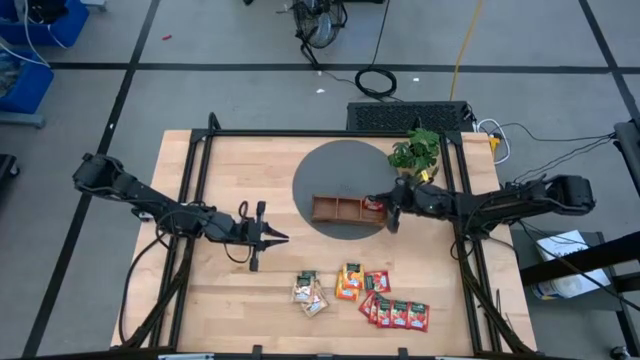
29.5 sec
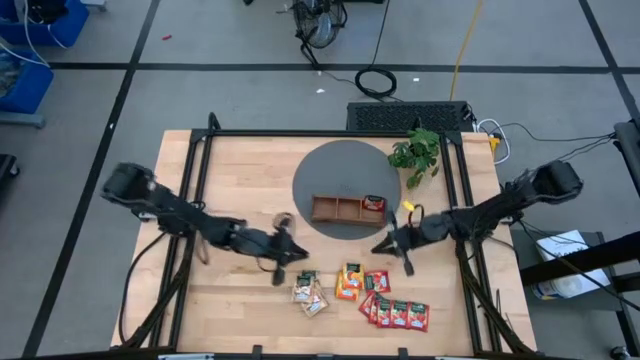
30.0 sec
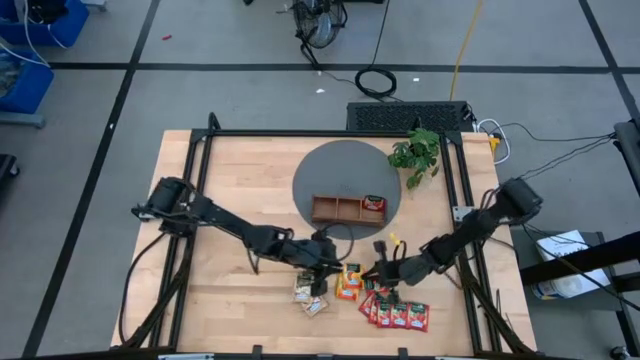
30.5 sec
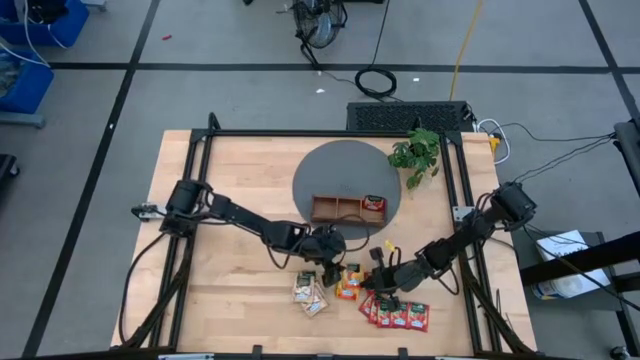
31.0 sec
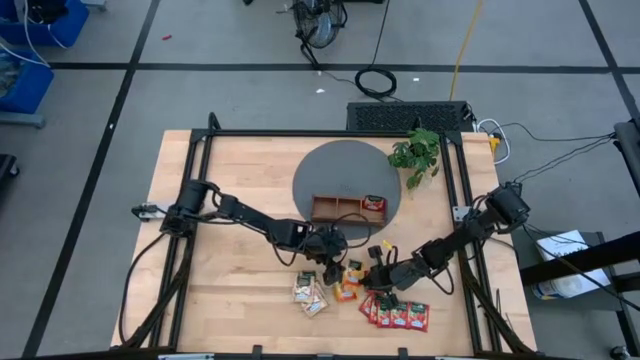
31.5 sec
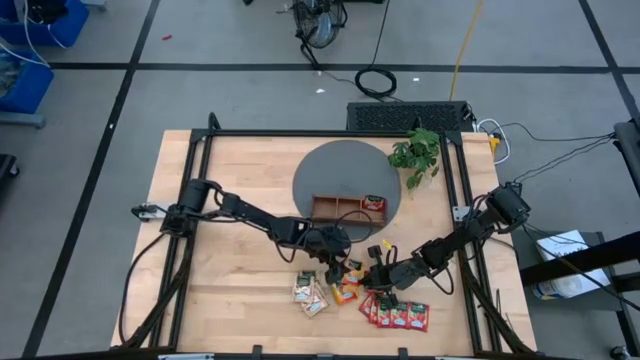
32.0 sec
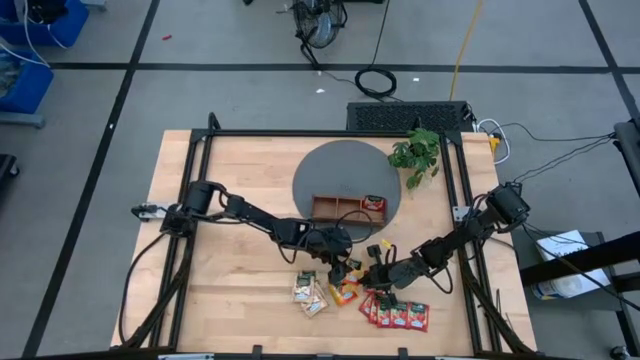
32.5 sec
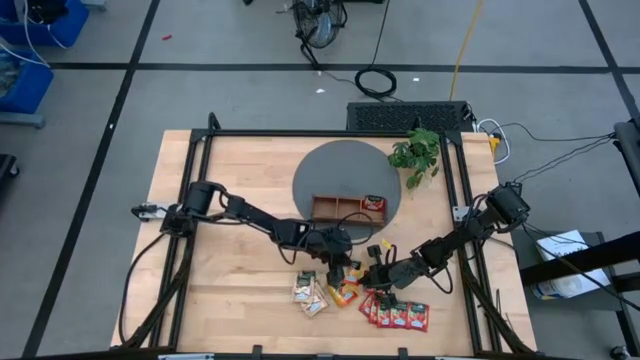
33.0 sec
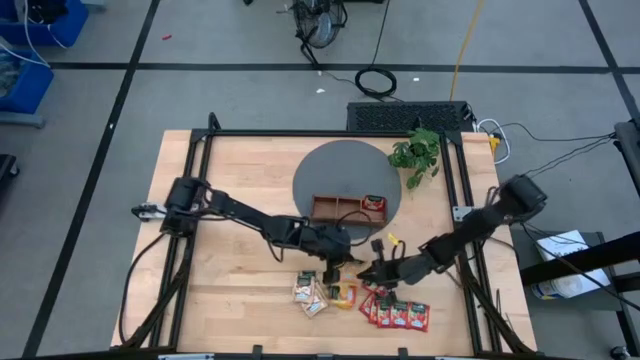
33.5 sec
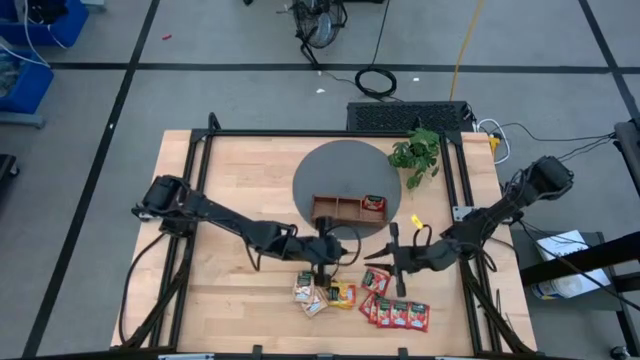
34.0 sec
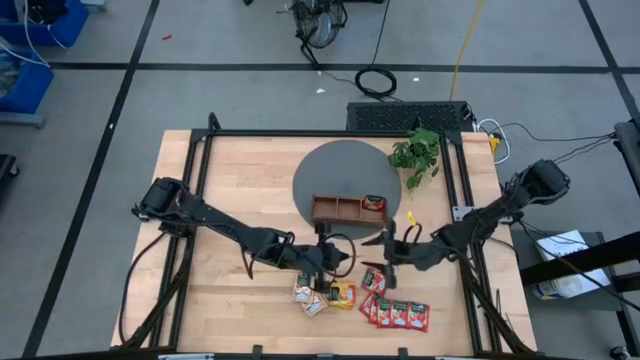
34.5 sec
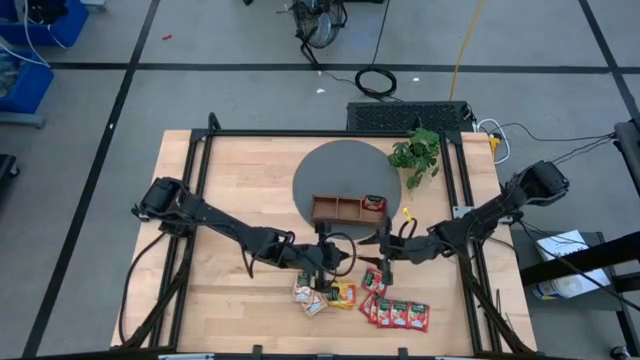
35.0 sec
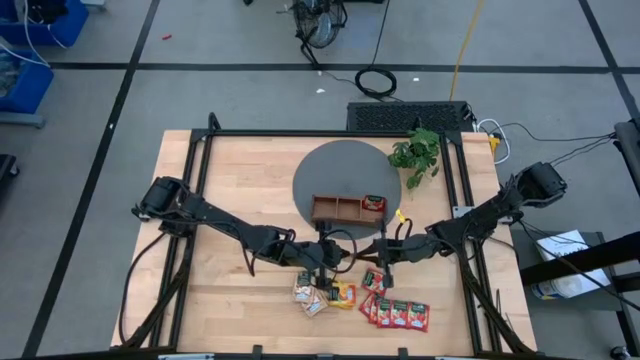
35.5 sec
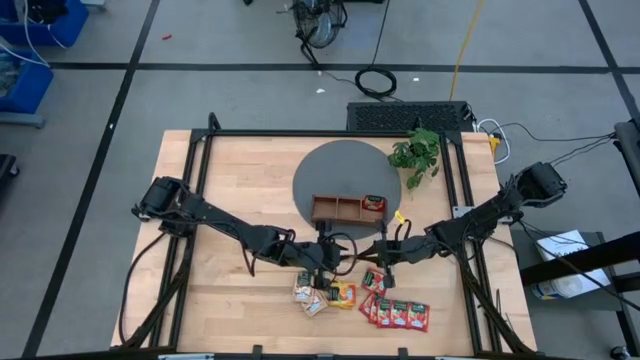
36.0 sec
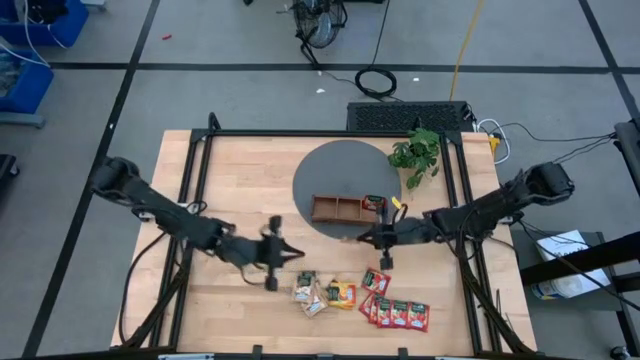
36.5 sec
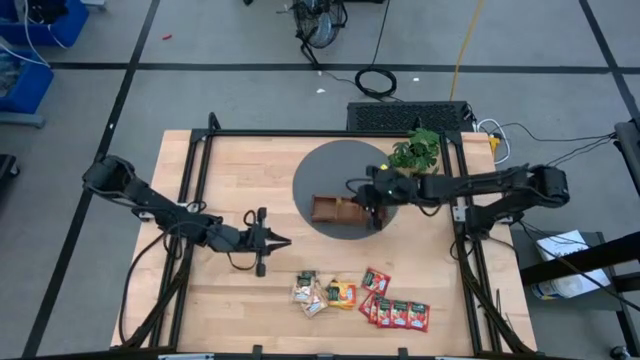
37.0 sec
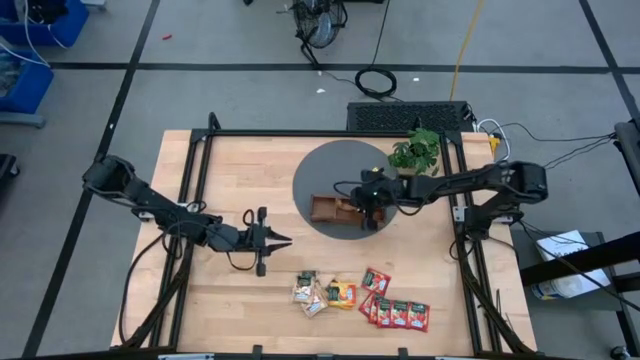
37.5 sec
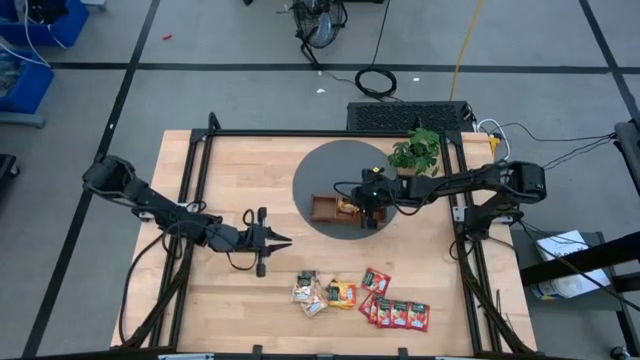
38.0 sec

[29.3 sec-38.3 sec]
Task: Pick & Place Tea
Put the yellow tea bag into the middle section of the wooden organiser

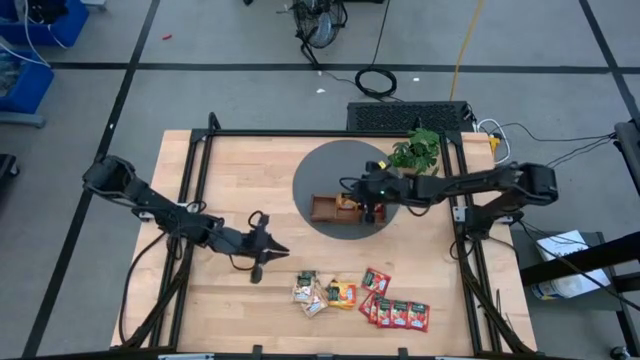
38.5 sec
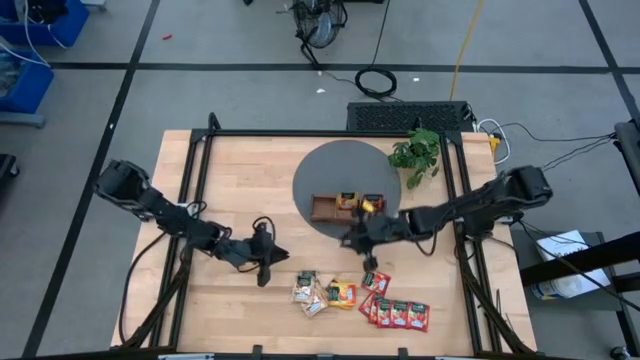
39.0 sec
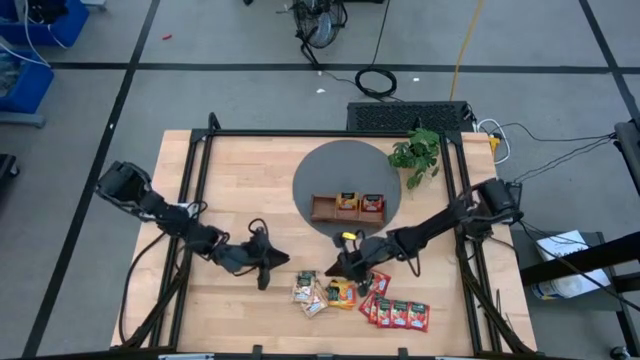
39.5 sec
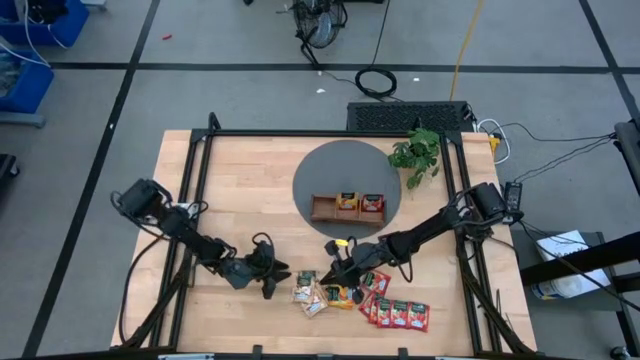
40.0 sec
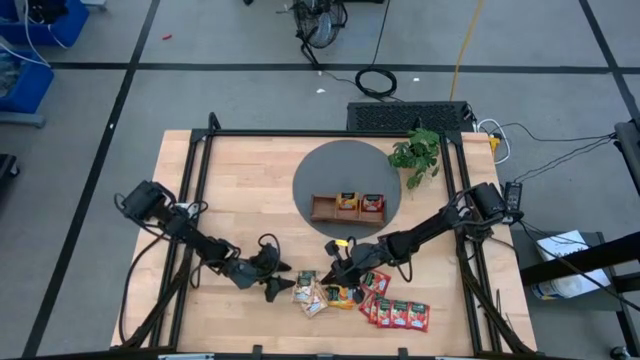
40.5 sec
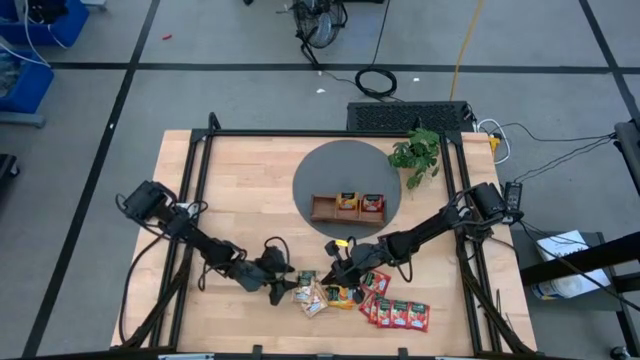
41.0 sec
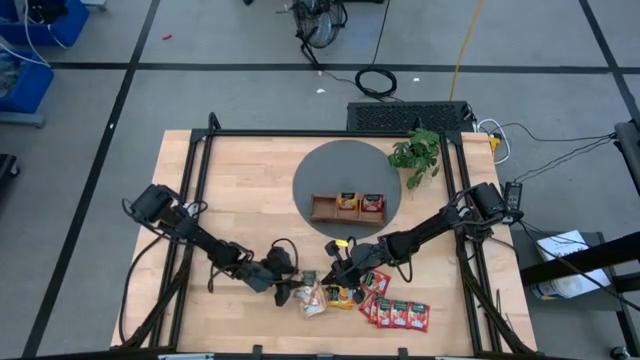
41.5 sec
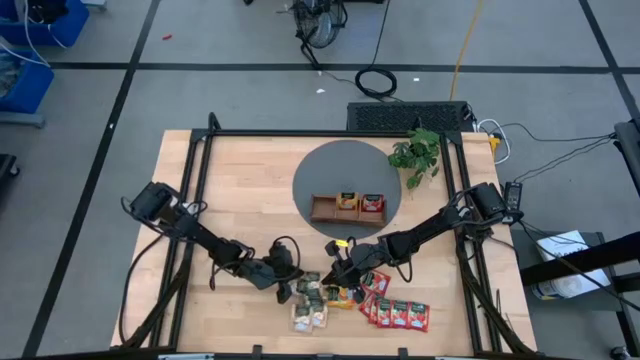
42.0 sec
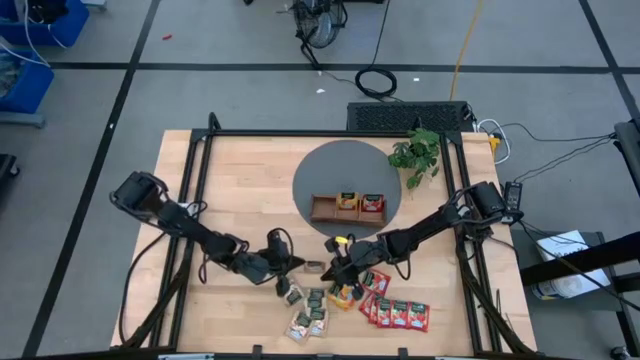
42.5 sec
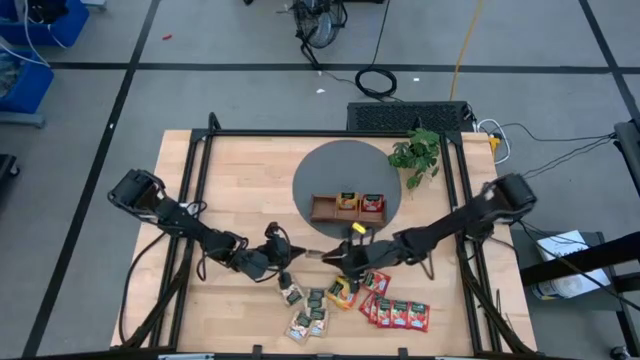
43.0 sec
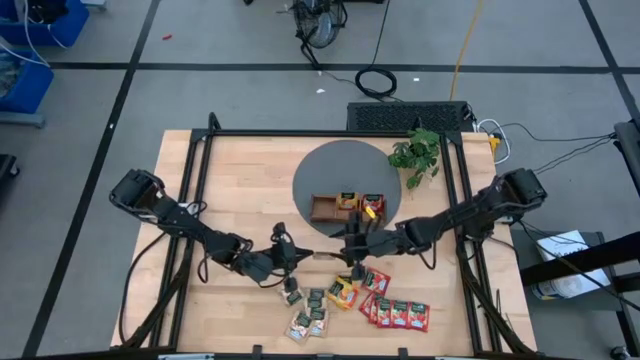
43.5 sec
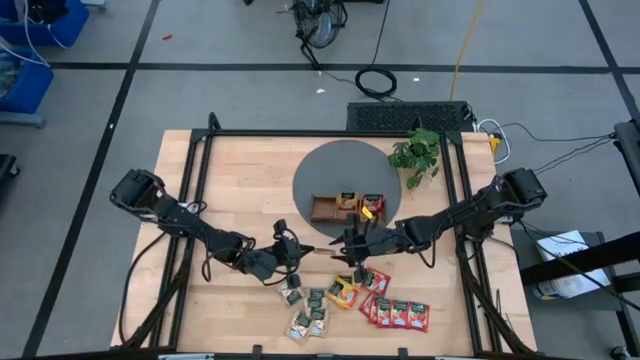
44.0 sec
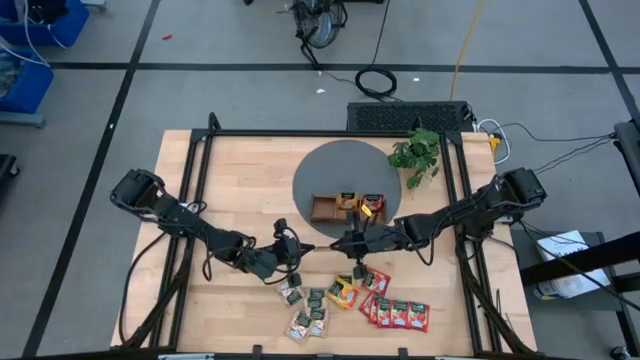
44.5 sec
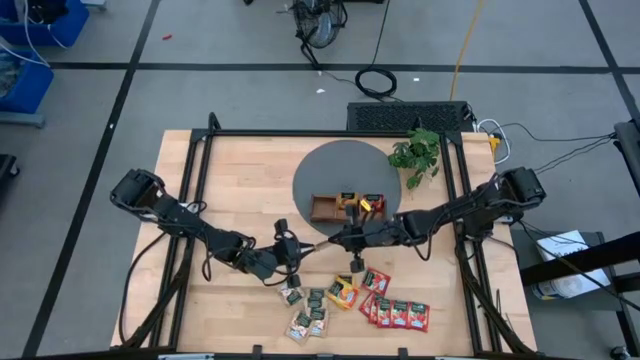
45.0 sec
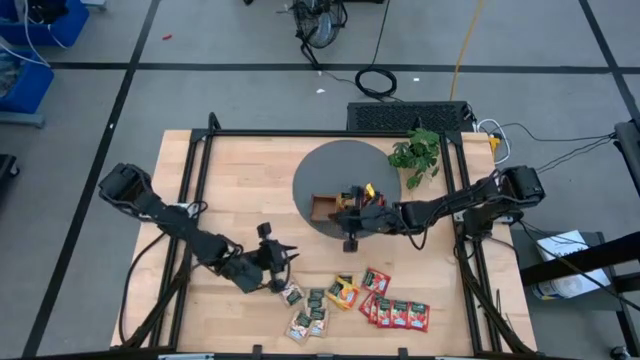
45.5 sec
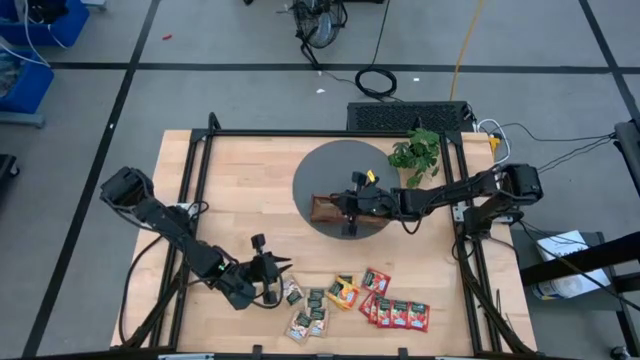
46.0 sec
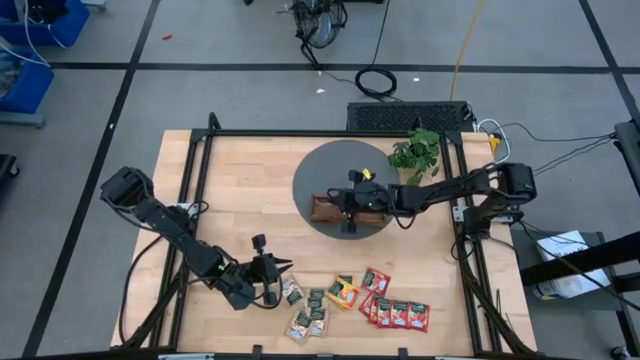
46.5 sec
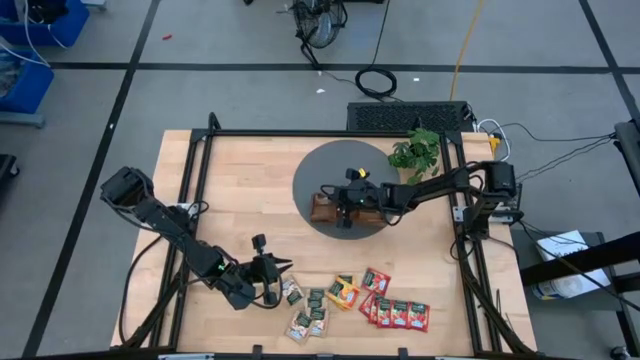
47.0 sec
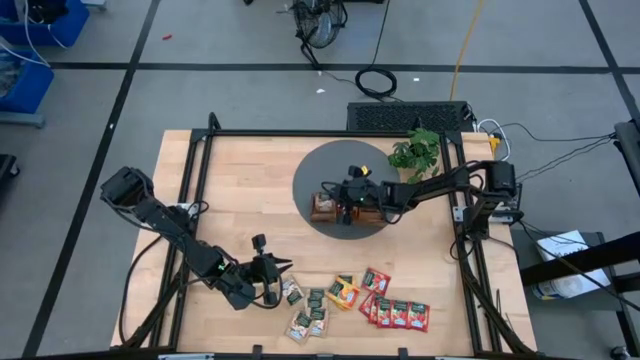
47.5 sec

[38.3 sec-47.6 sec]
Put the brown tea bag into the left section of the wooden organiser

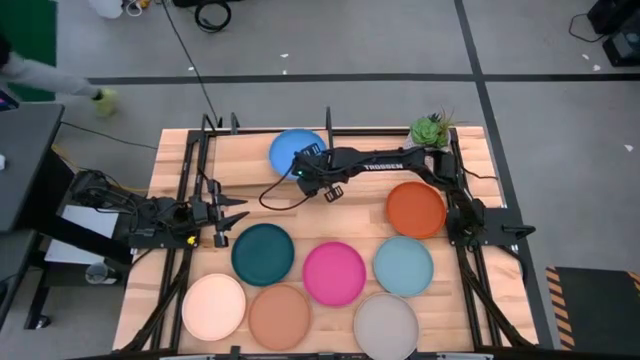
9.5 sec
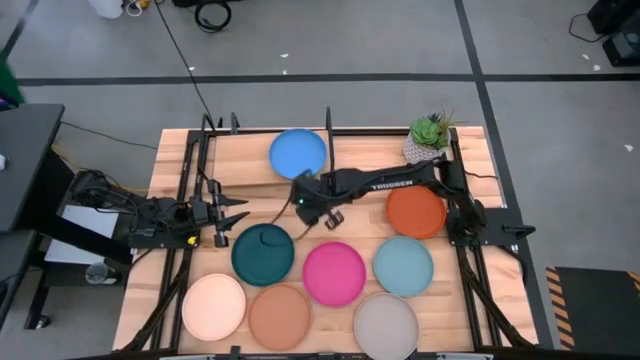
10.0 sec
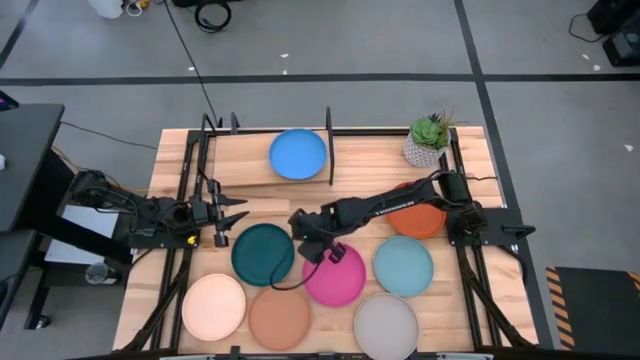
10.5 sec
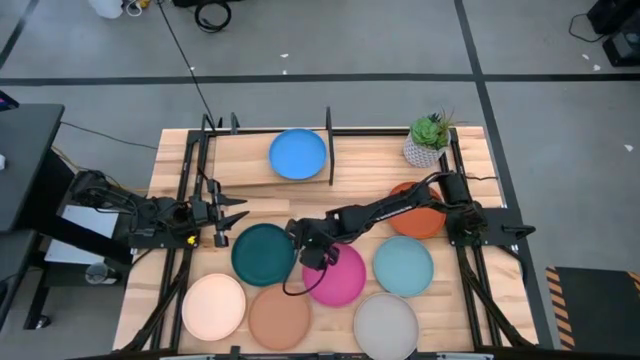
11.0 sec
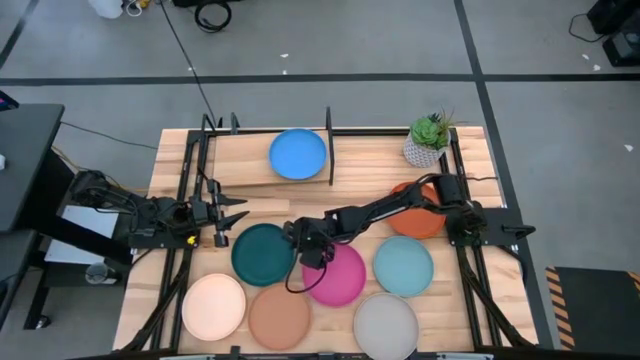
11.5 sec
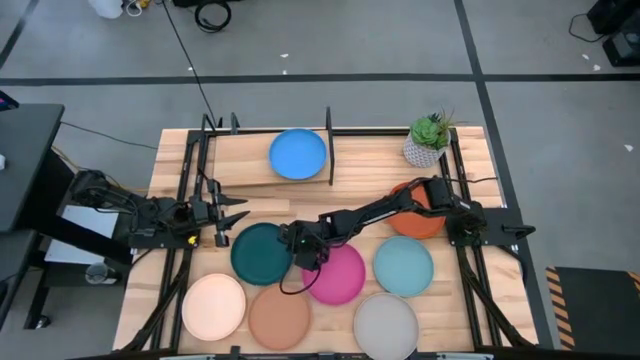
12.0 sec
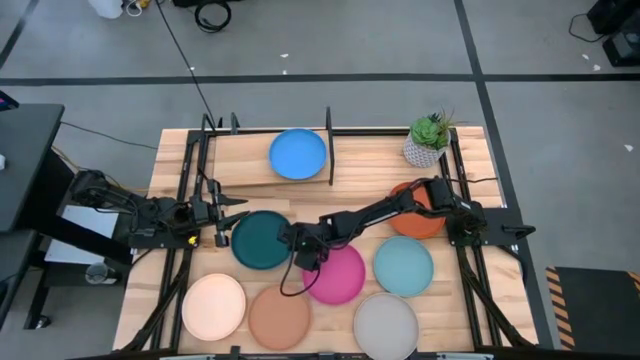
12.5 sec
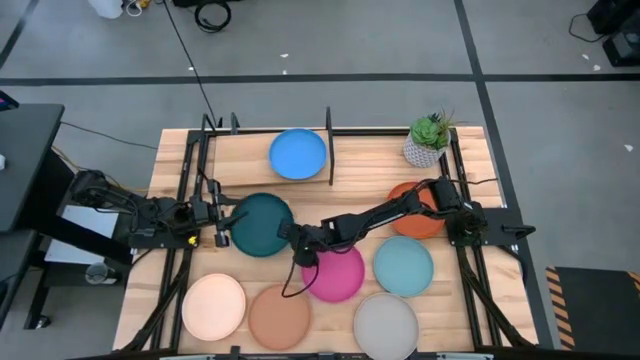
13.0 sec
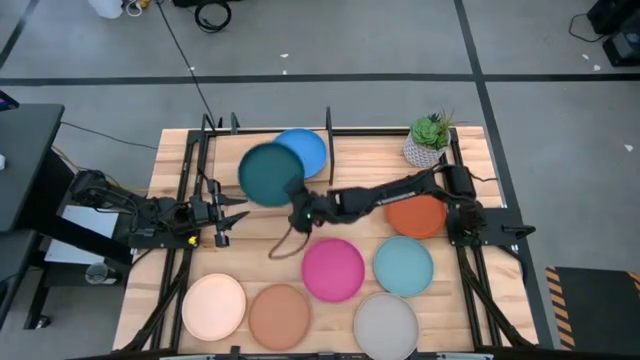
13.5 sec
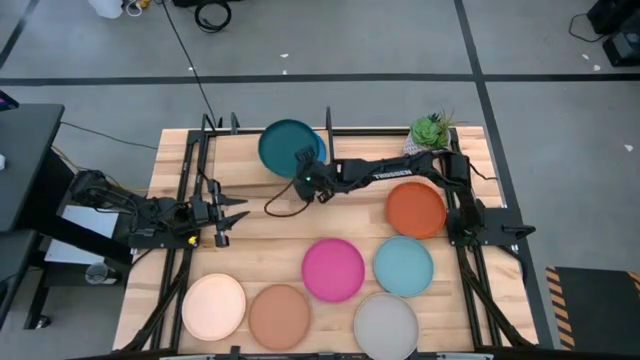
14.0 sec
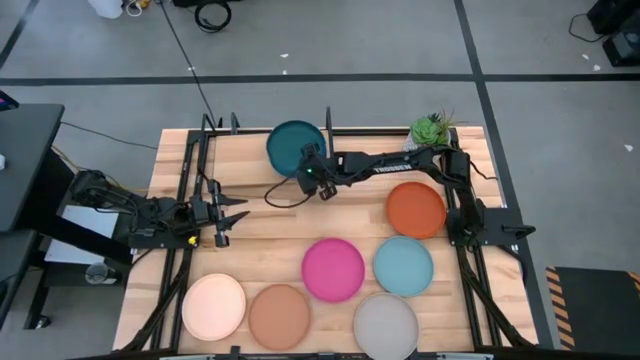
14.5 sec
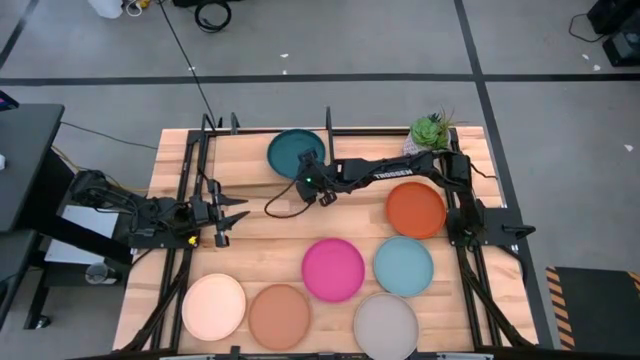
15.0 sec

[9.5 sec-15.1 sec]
Task: Place and stack plates onto a shelf
Stack the green plate on top of the blue plate on the shelf
